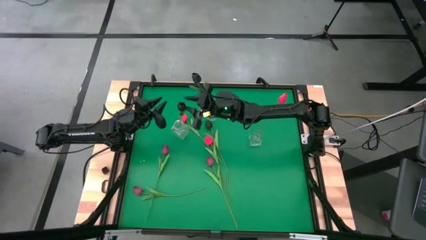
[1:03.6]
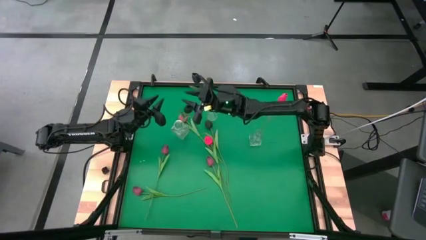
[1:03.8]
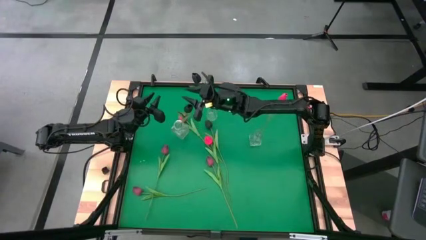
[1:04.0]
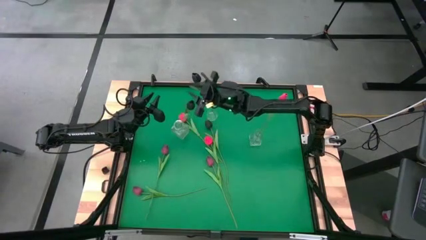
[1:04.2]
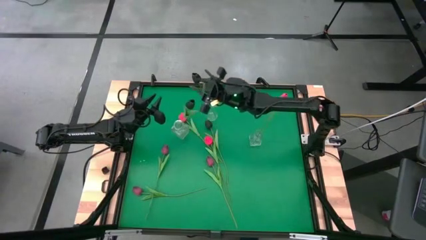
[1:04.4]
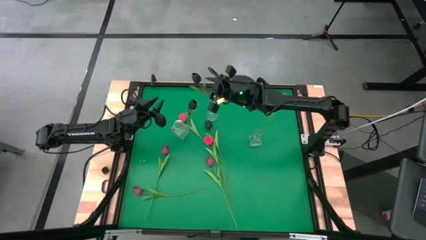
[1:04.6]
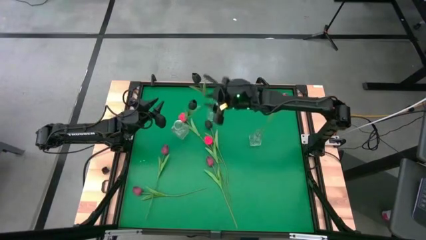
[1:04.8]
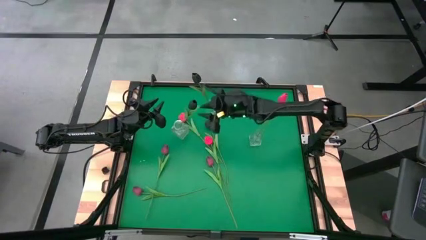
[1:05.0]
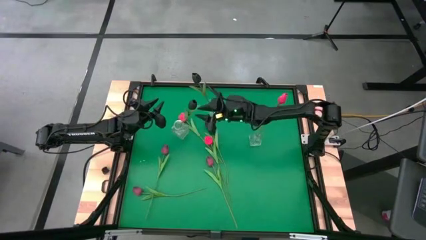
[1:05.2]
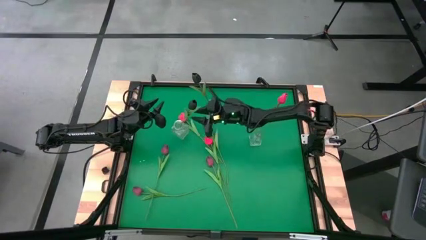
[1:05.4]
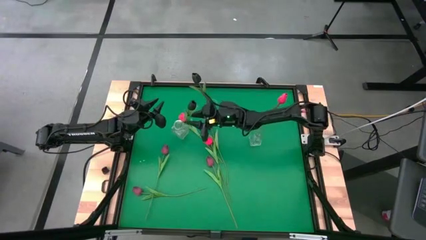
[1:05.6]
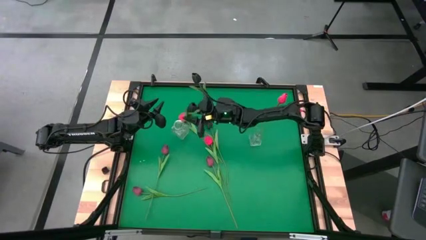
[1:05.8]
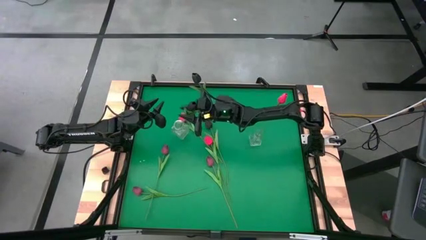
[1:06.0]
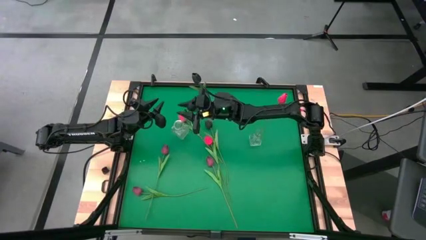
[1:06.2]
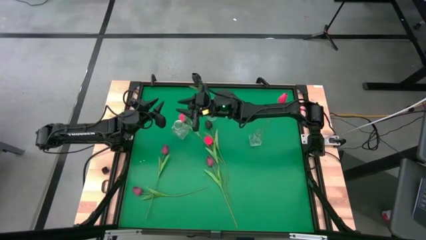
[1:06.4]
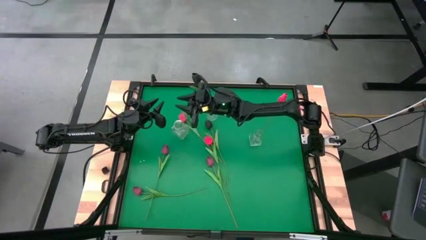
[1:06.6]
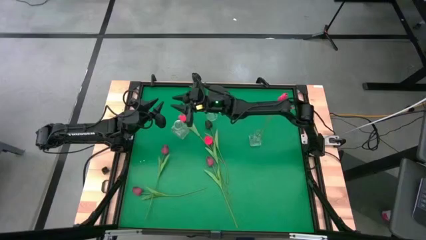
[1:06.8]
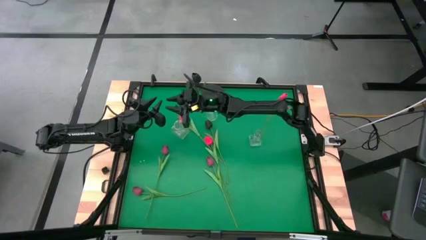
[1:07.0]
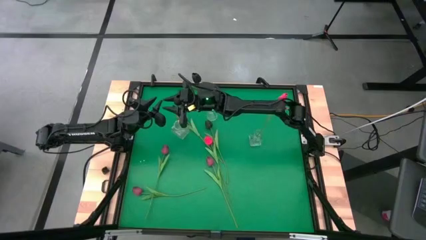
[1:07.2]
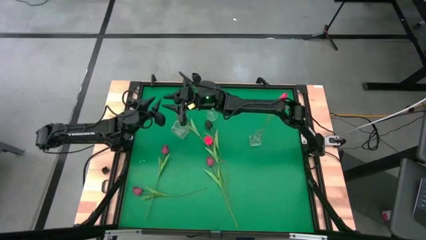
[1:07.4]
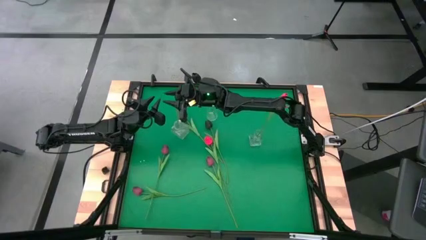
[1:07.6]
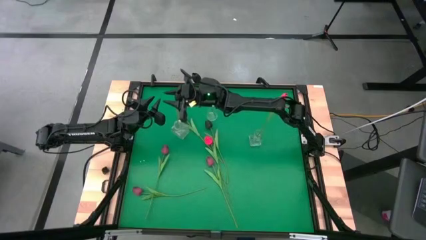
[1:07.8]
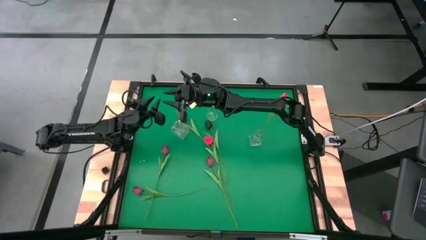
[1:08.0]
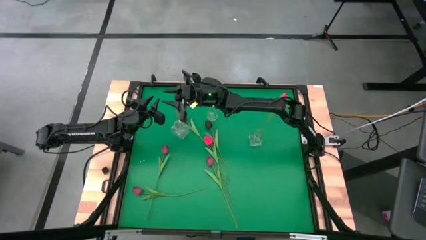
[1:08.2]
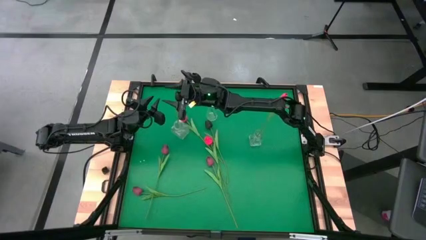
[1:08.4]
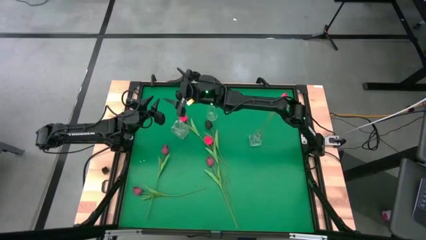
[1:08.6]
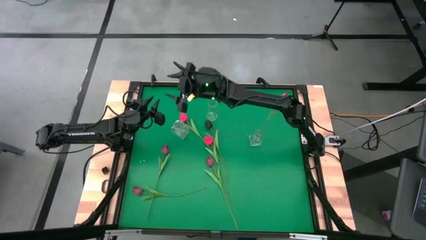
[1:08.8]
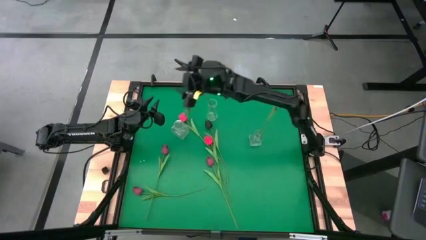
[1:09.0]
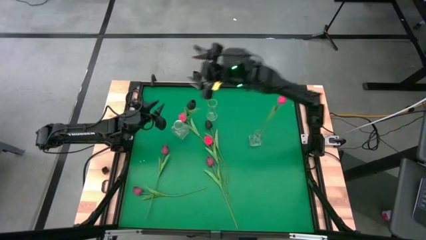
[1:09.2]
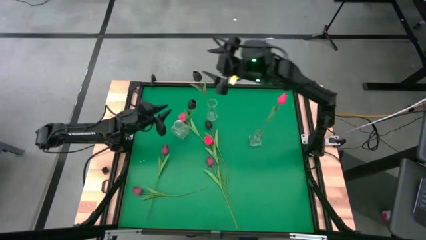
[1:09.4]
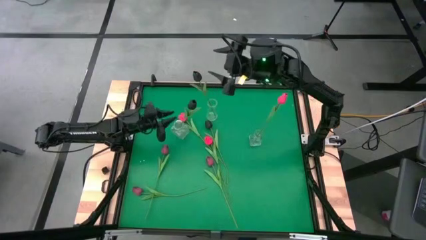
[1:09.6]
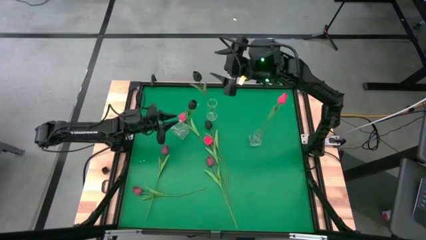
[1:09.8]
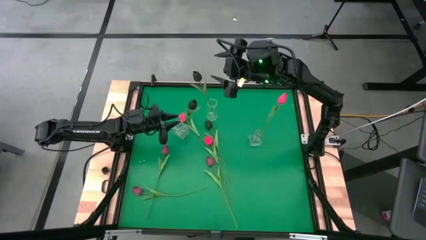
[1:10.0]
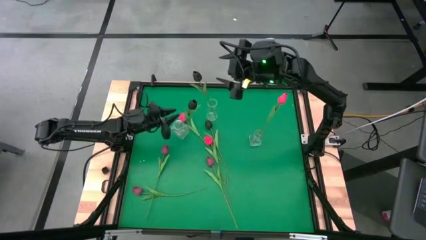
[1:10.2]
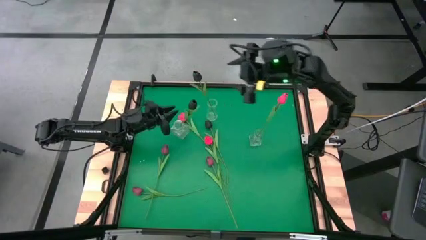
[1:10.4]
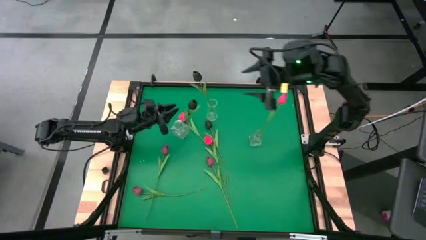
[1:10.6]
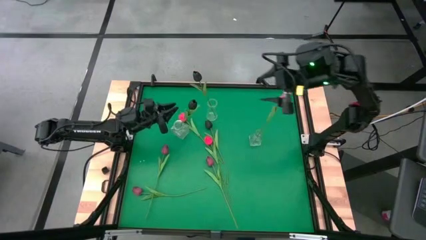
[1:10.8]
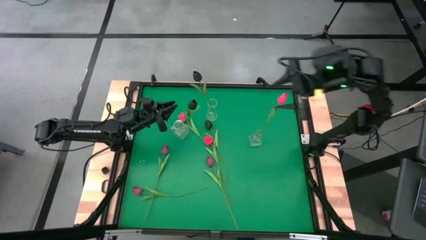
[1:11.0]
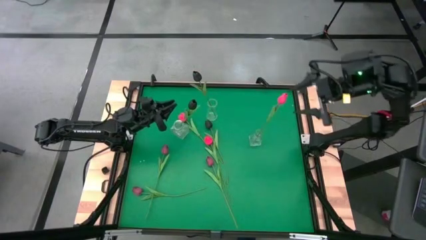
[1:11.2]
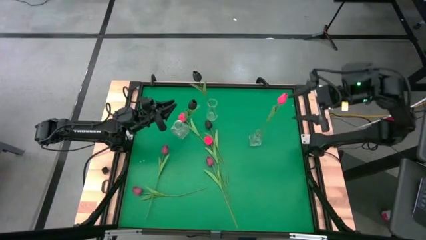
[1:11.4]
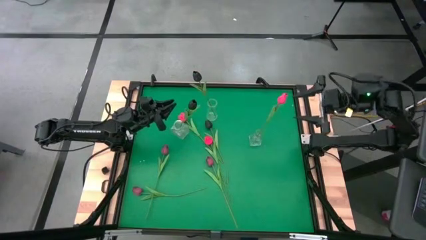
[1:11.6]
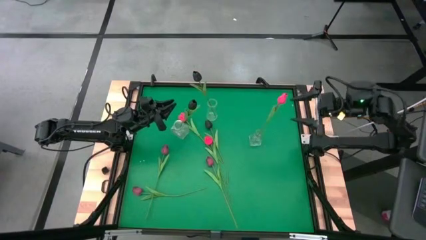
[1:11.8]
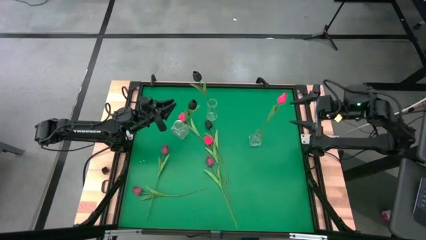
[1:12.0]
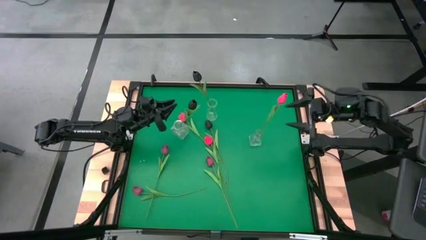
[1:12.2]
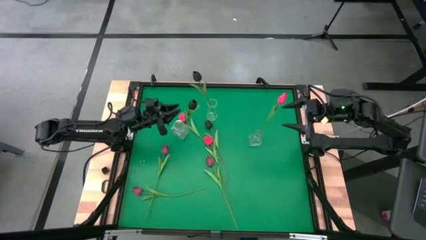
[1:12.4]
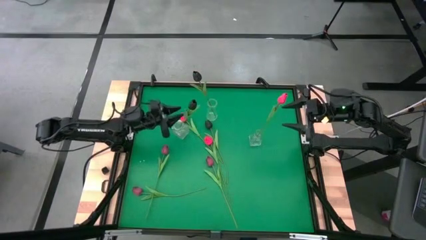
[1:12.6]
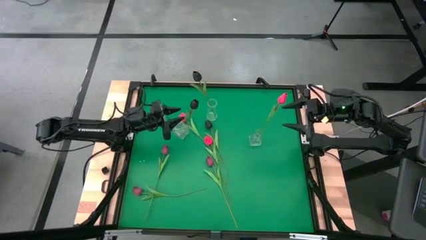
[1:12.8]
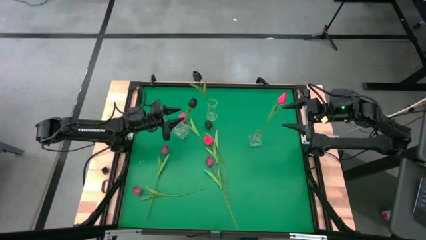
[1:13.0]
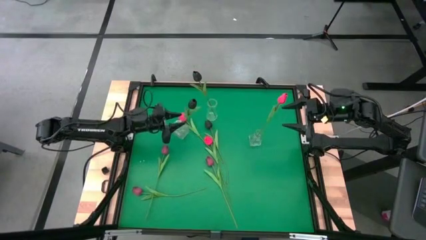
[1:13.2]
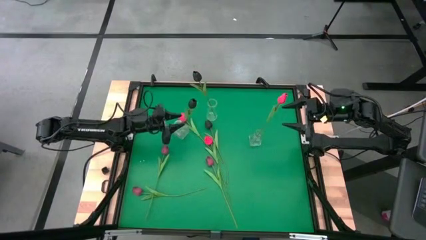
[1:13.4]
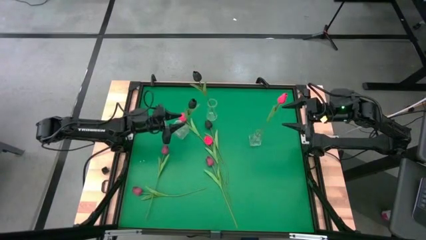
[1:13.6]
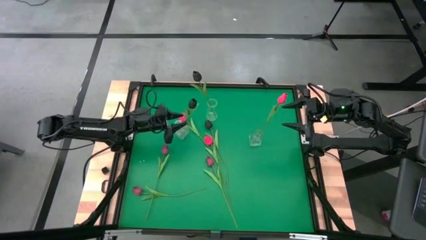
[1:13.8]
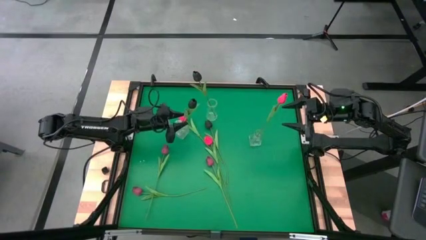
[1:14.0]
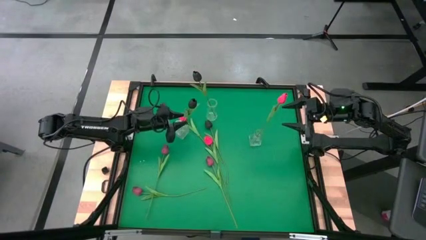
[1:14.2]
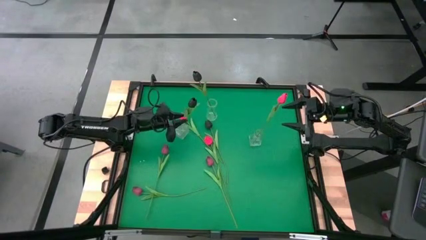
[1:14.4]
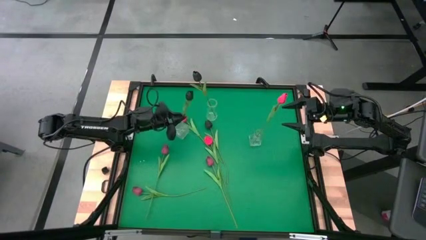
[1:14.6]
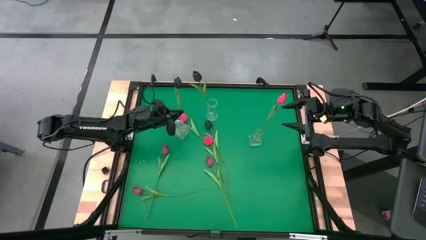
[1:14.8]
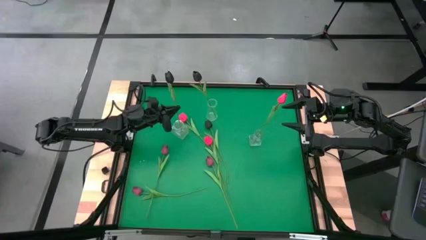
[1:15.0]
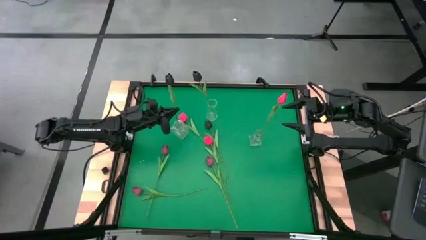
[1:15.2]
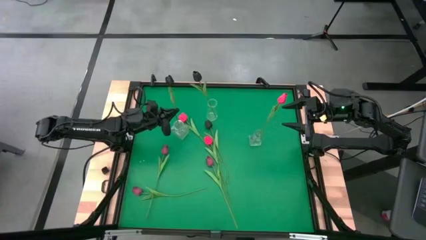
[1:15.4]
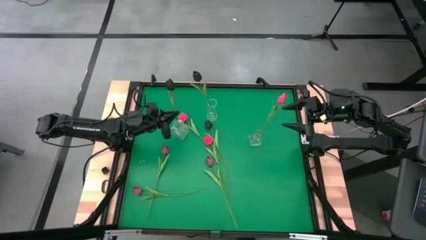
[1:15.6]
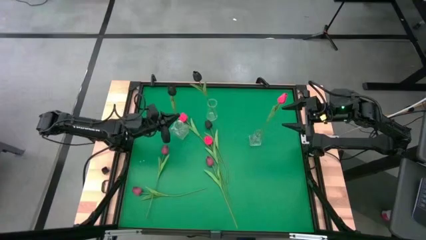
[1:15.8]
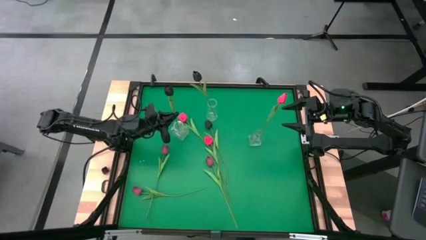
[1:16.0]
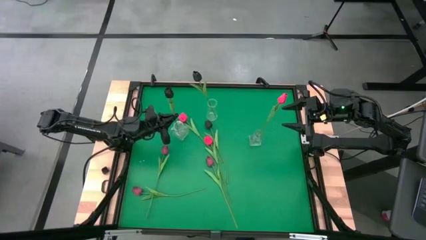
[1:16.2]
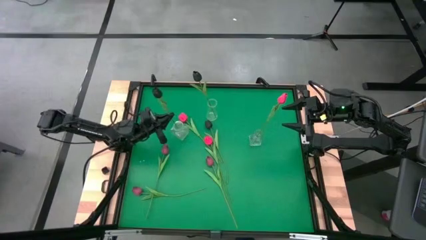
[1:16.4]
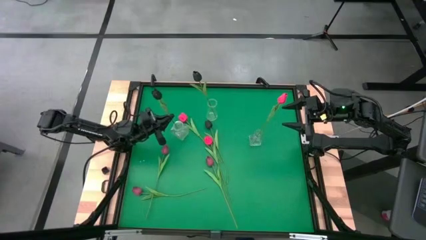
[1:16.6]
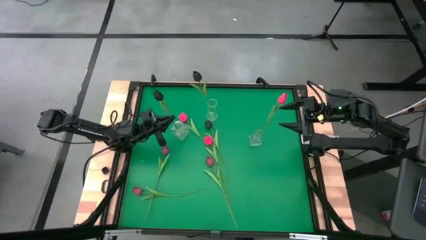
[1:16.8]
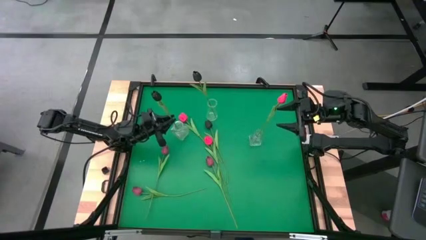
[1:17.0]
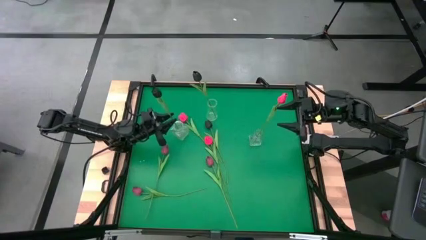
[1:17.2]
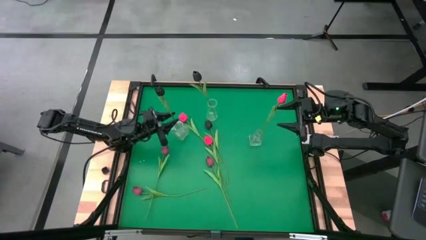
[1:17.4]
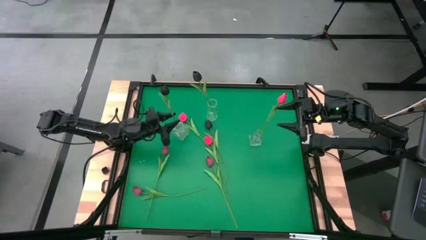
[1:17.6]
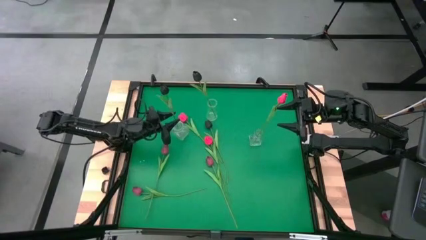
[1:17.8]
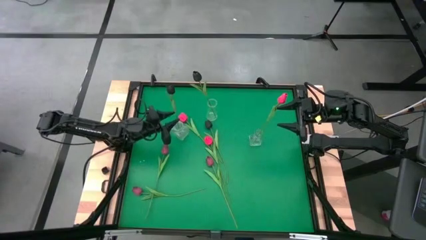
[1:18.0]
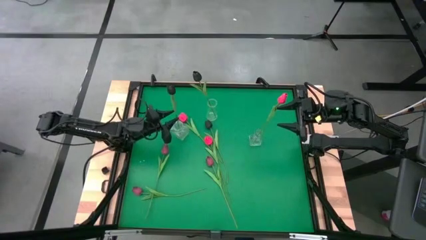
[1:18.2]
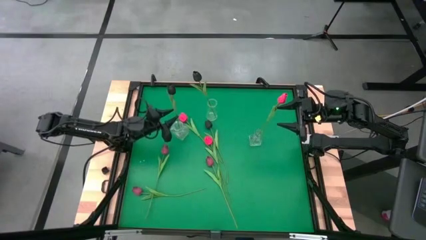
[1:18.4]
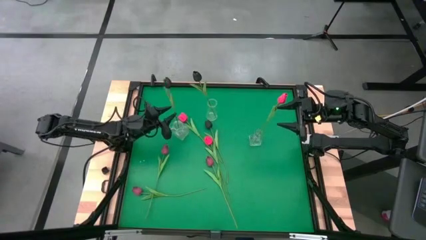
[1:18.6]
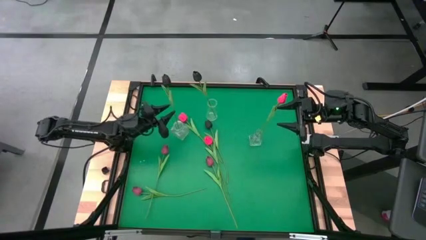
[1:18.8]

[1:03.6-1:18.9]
Task: Sort flowers into vase by color
Put the right black tulip into the bottom left transparent vase
